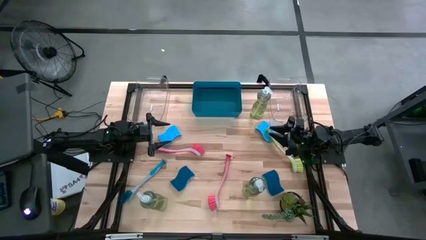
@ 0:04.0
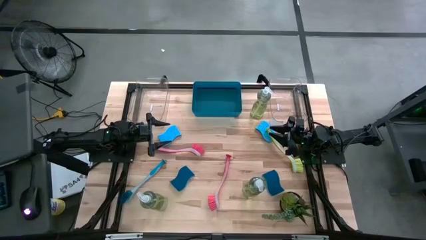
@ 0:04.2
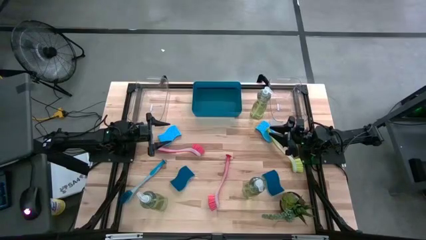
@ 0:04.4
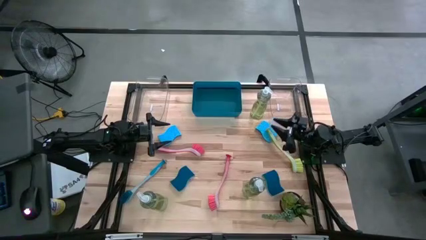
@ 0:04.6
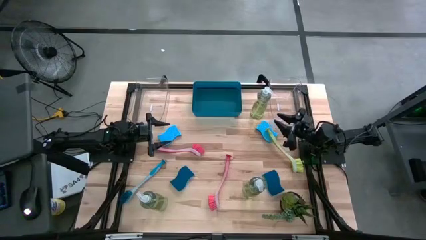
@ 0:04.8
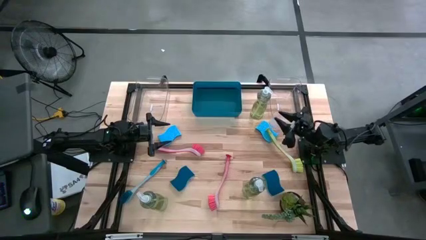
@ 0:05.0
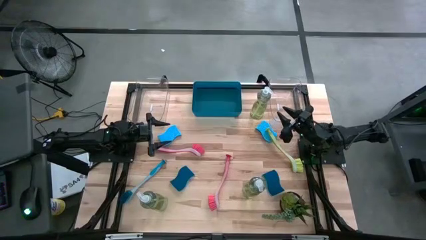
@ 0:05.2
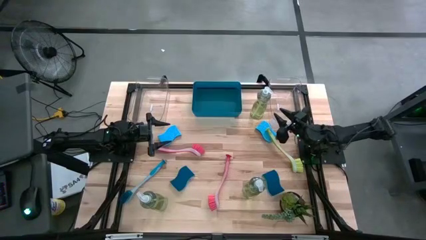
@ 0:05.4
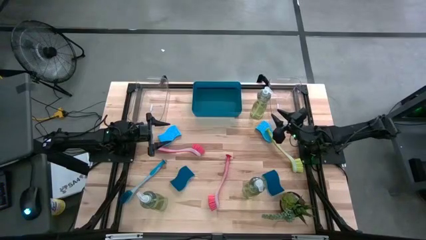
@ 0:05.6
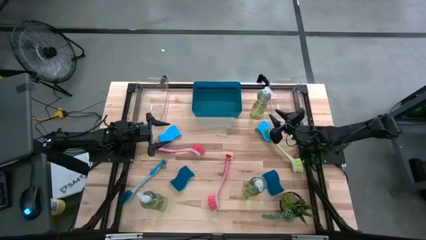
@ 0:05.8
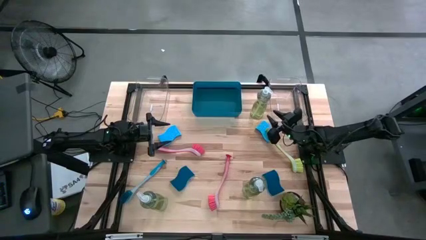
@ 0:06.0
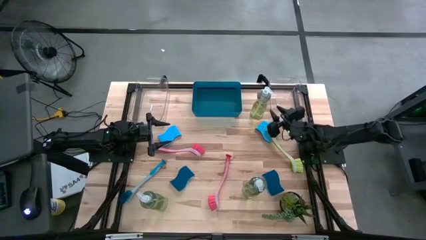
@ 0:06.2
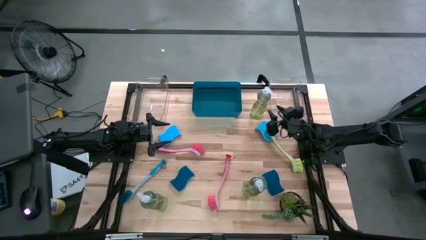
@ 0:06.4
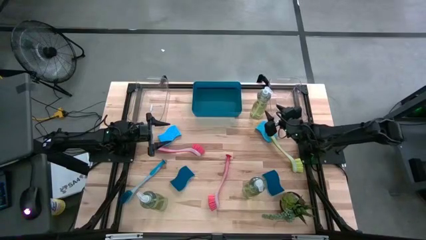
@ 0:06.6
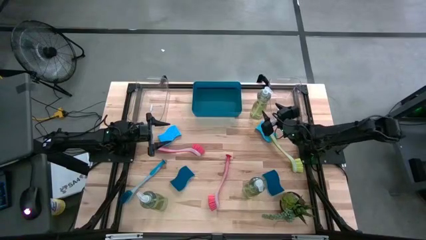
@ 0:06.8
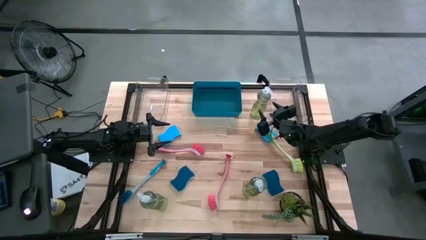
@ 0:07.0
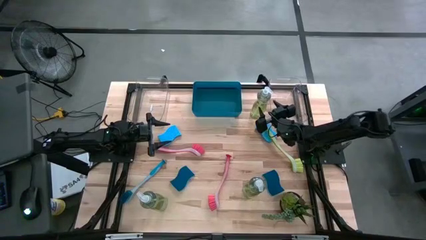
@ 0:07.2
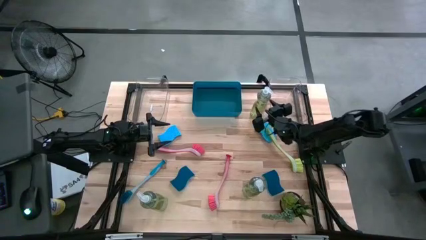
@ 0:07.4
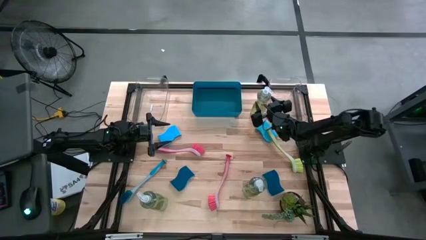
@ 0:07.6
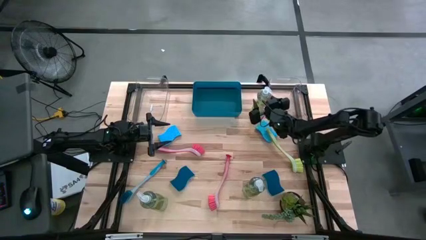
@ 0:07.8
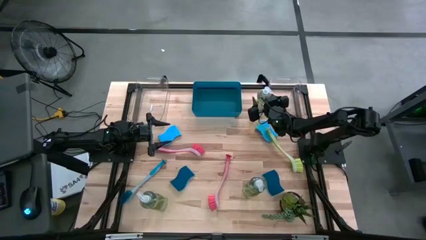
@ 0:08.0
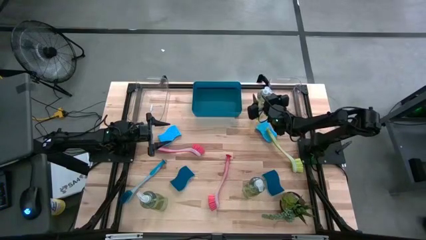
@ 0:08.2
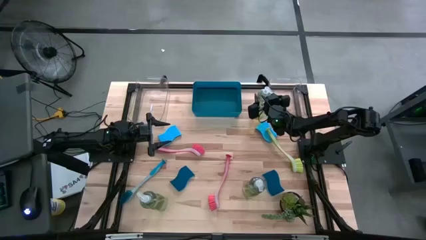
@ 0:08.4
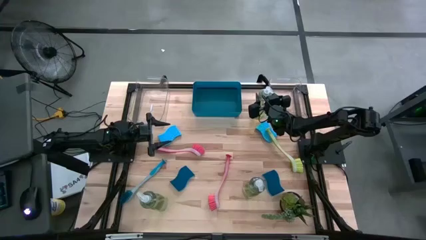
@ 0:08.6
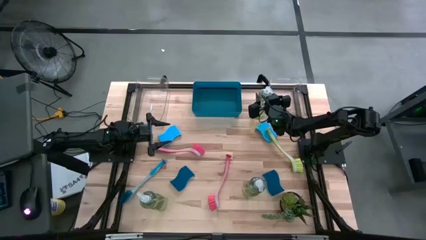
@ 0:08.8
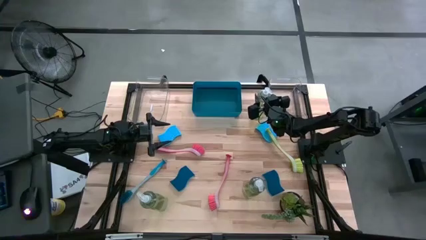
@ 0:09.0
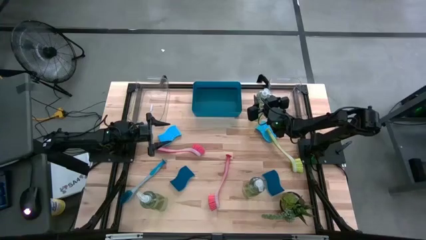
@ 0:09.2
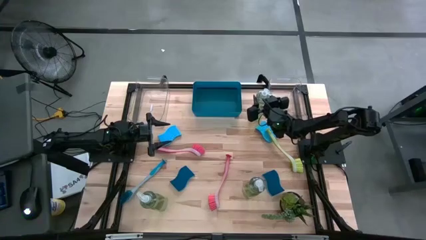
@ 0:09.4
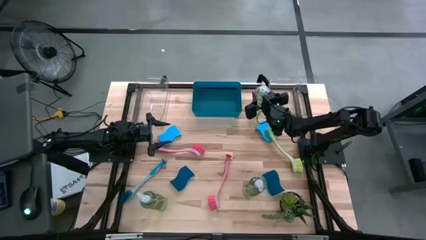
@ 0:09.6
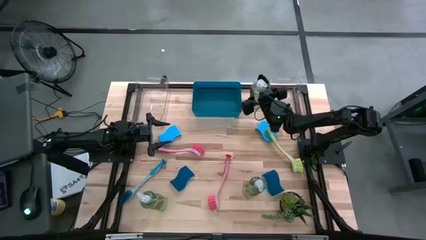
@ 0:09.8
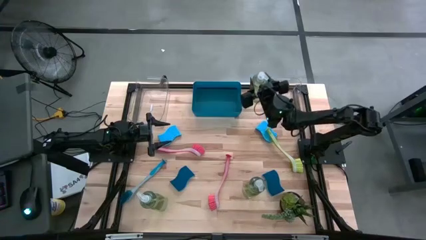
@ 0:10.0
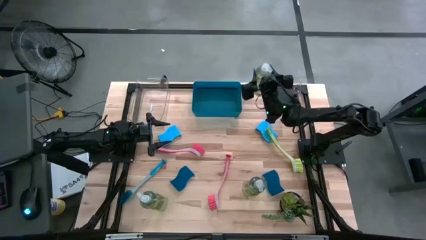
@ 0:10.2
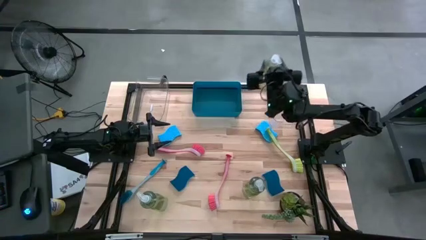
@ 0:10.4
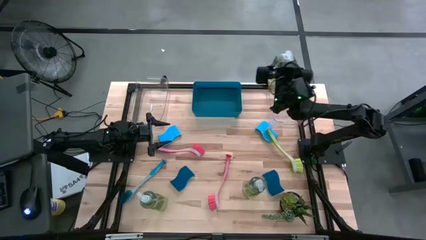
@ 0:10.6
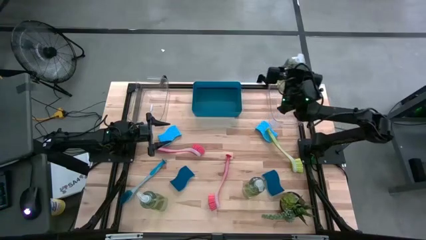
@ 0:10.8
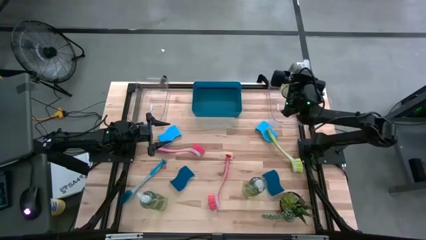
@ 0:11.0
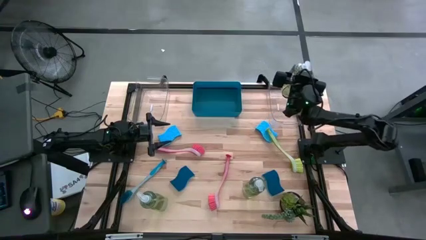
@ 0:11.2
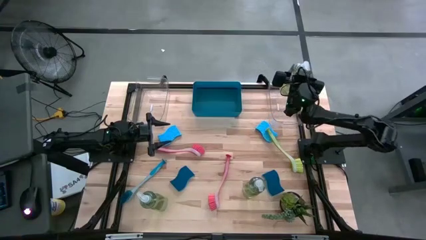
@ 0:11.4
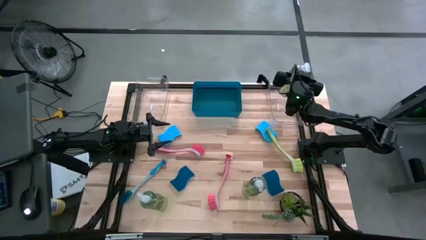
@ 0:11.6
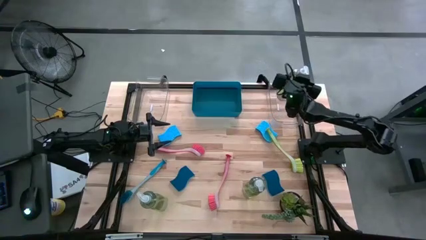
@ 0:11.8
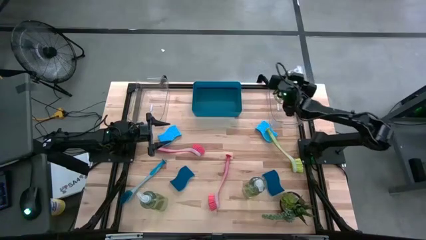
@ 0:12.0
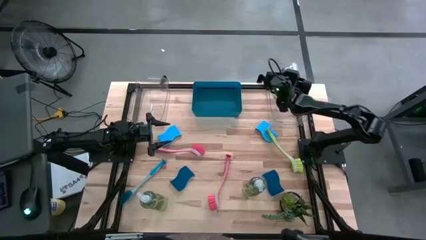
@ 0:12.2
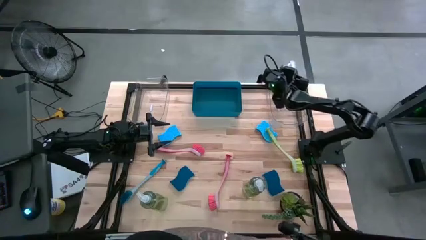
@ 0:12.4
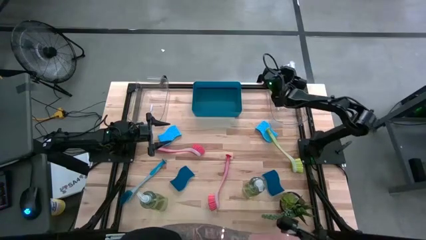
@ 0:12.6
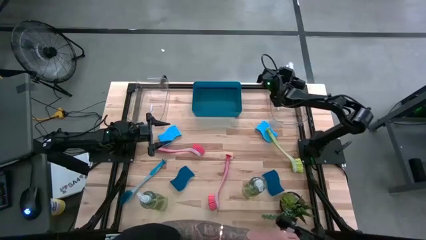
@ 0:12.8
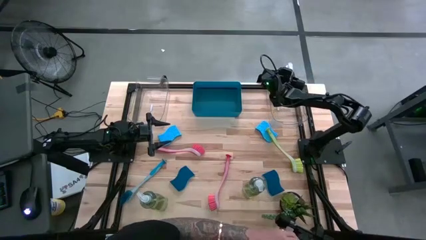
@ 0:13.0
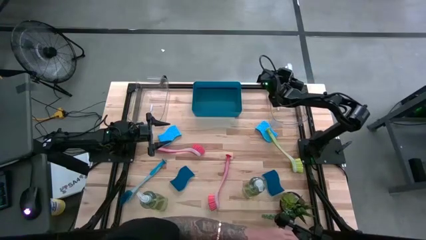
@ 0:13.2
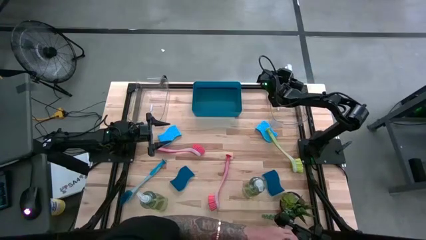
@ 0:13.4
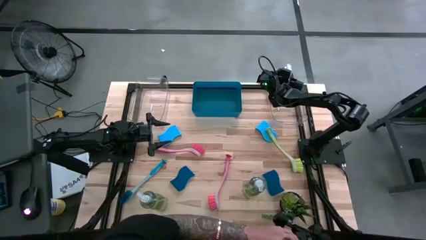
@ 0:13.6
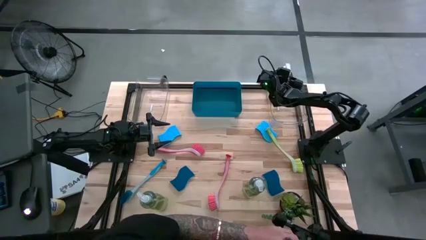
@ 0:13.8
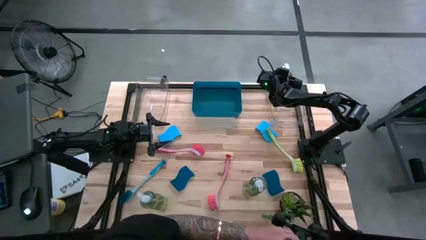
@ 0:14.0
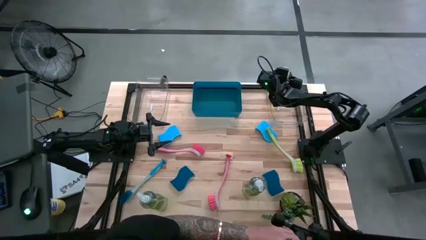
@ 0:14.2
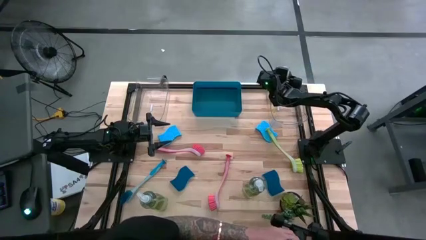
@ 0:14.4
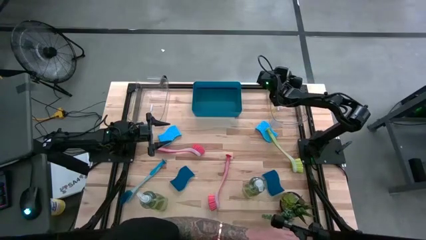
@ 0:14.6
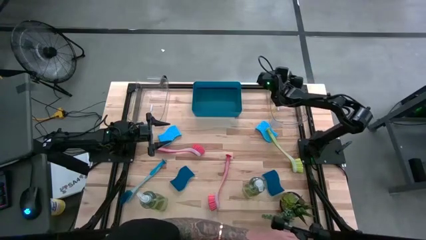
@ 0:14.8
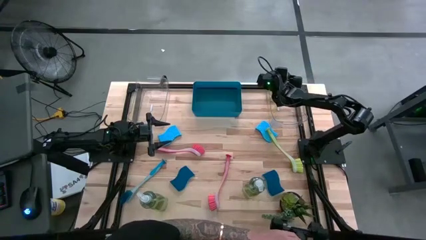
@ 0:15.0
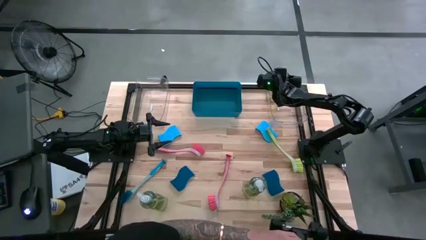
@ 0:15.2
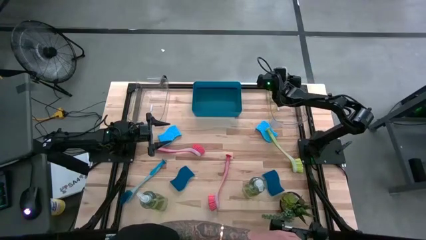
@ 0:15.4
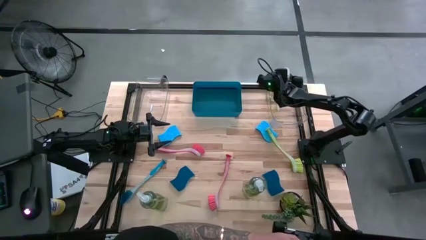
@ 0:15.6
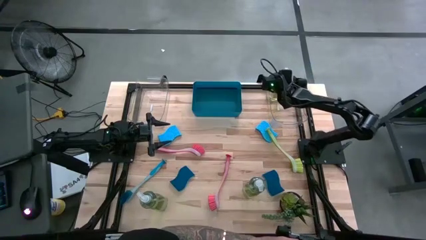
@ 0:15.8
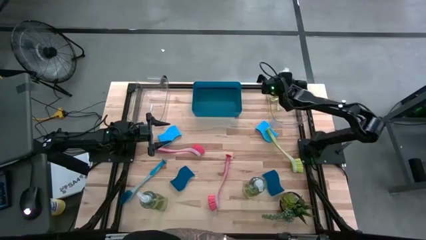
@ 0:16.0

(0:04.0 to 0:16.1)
Task: Pick & Place Kitchen Sink Supplies
Put the top green dish soap into the right transparent bin
